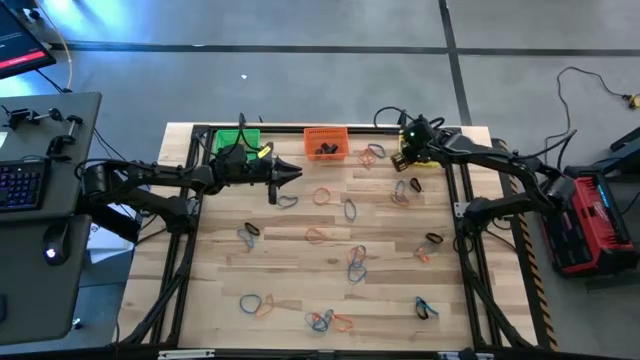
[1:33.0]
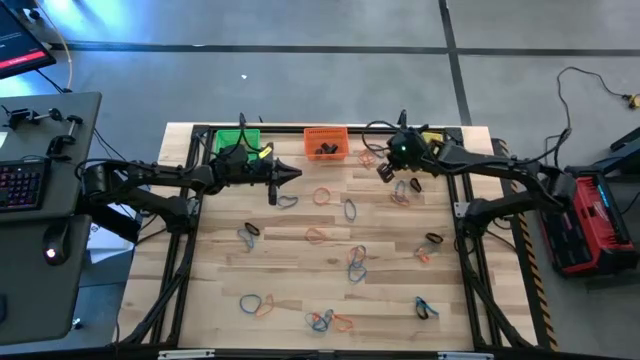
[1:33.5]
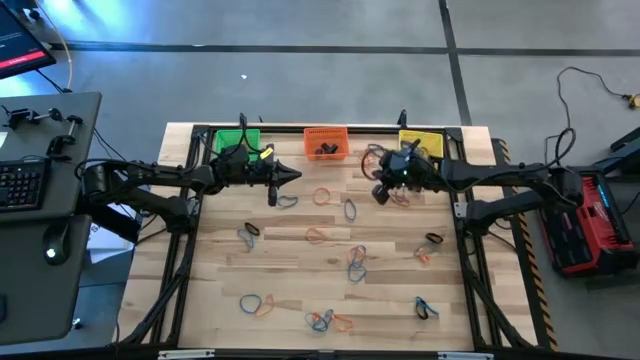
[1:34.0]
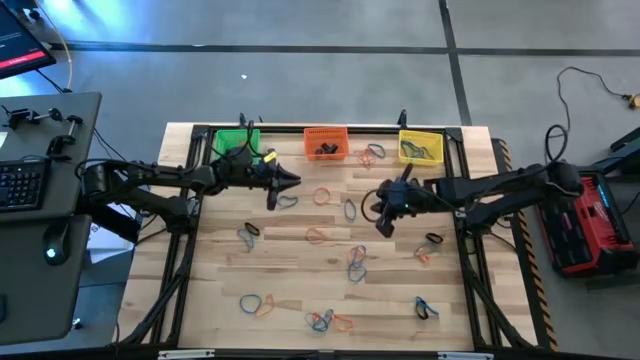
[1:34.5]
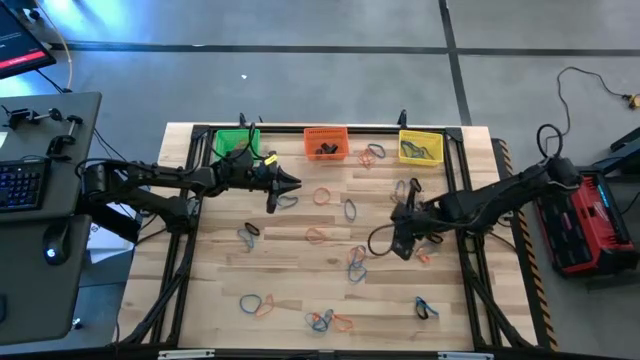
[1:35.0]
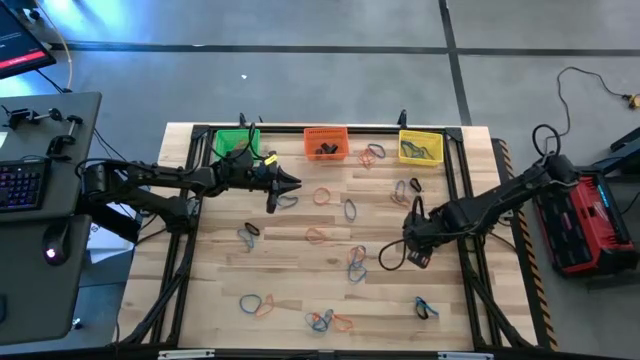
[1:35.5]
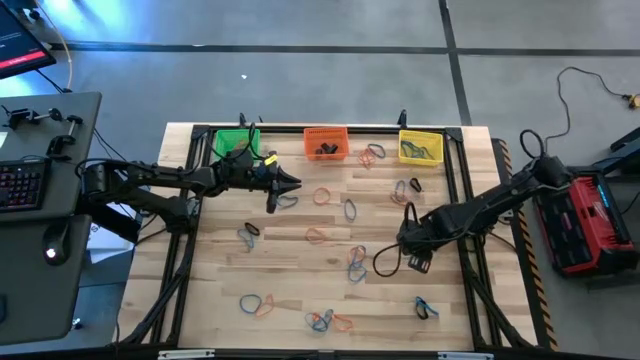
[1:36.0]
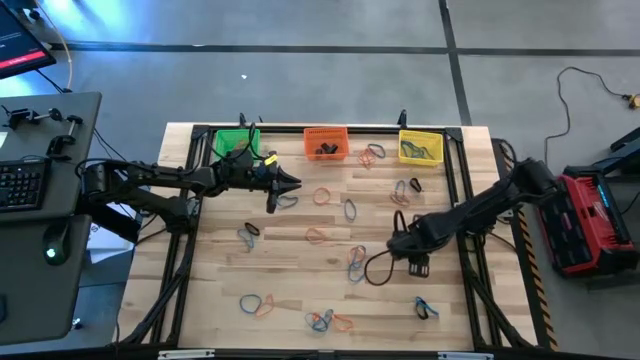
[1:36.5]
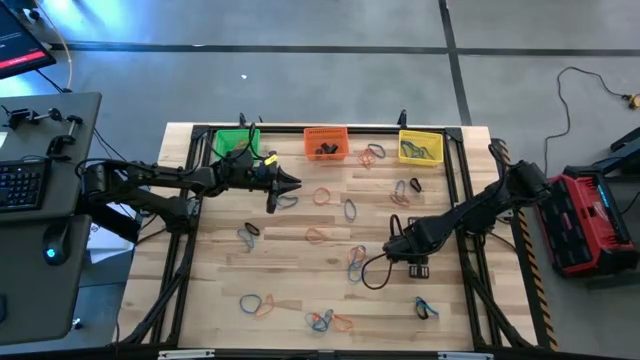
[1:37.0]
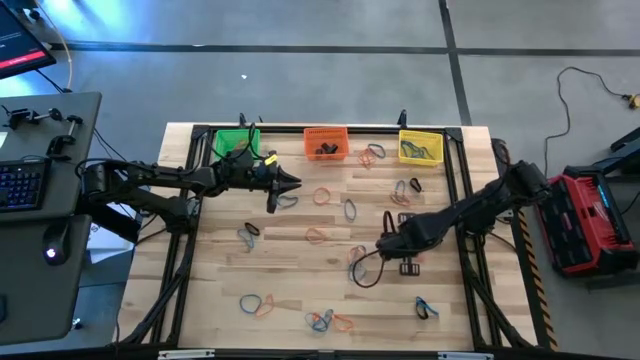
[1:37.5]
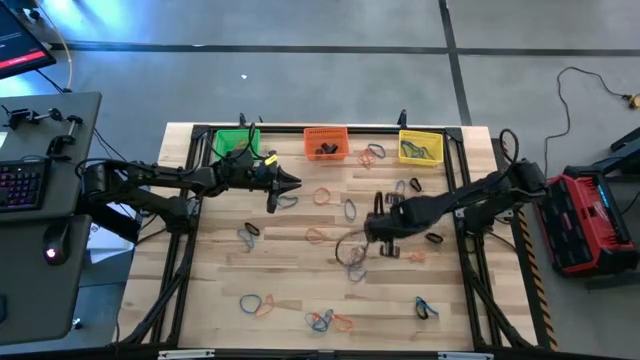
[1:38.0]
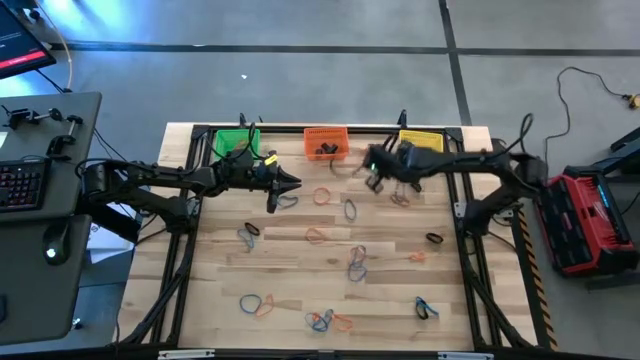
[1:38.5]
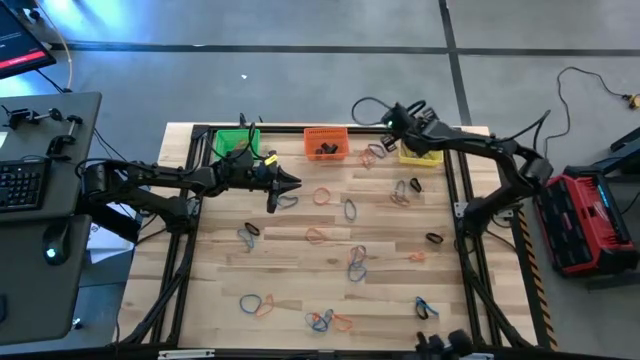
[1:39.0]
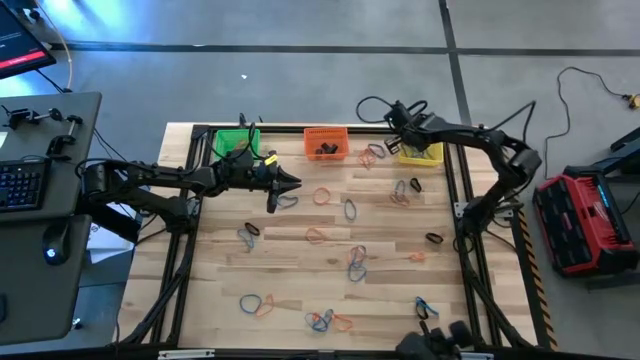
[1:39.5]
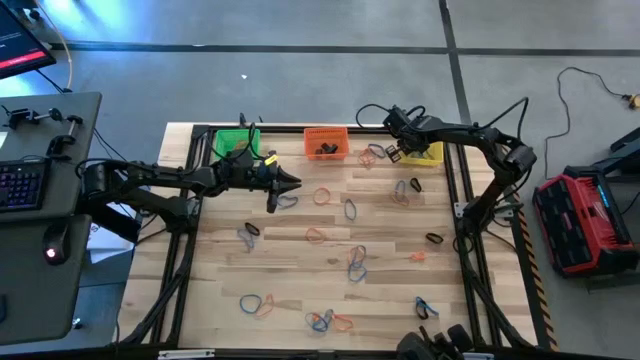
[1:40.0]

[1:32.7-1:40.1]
Task: Sort rubber bands into baskets
Put the blue rubber band into the yellow bin

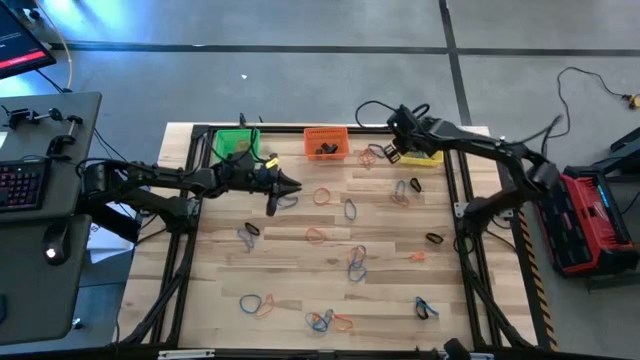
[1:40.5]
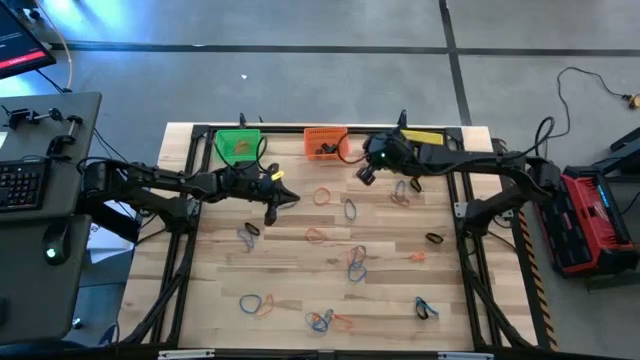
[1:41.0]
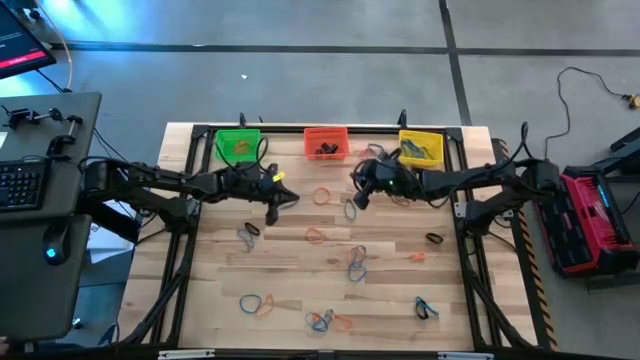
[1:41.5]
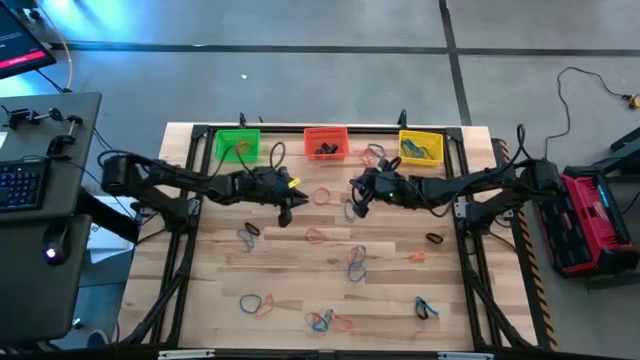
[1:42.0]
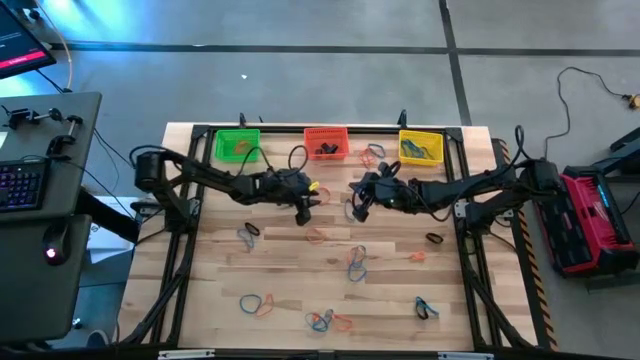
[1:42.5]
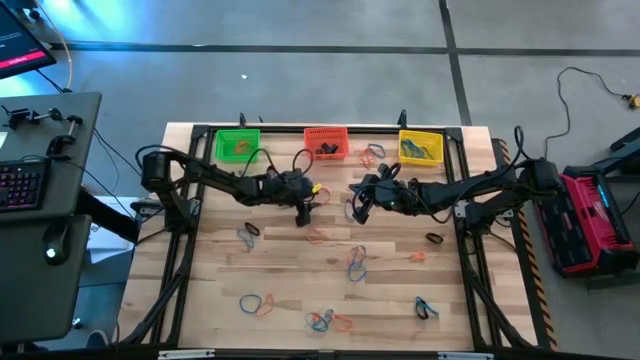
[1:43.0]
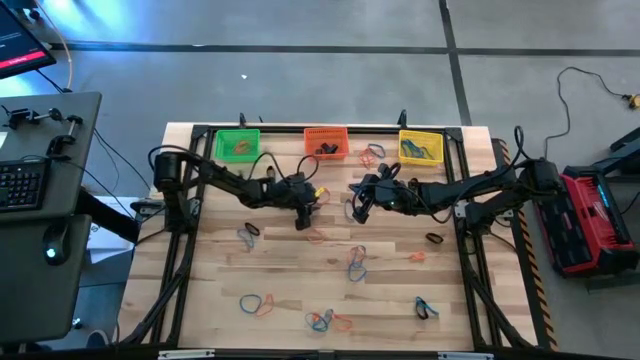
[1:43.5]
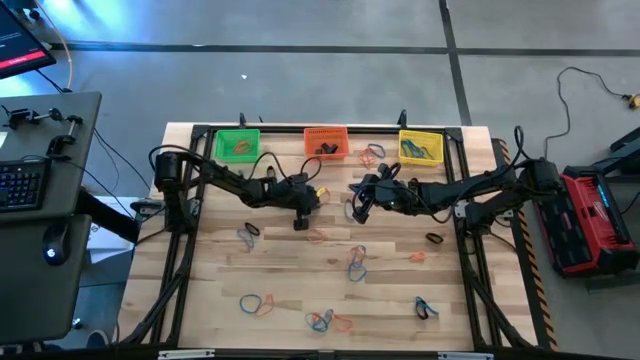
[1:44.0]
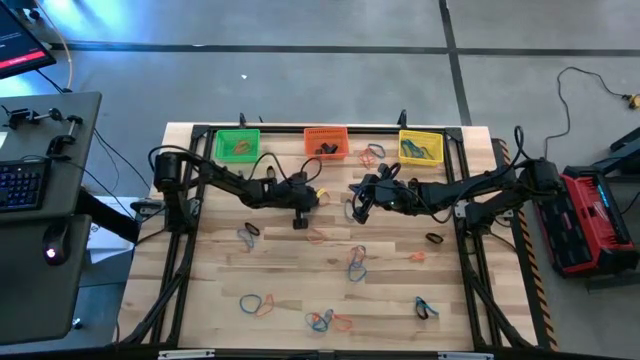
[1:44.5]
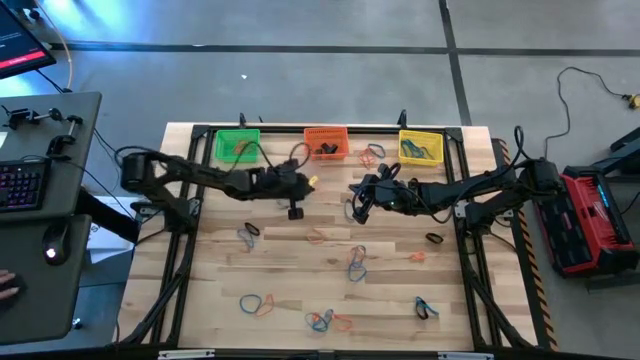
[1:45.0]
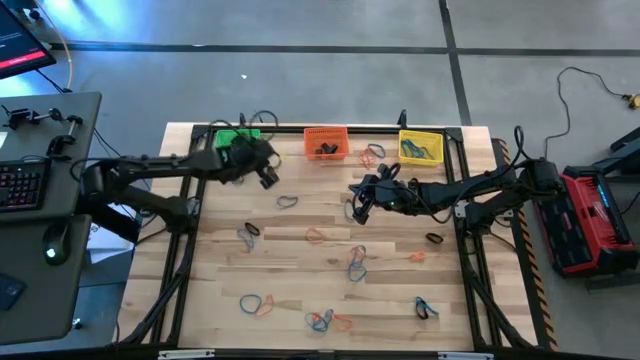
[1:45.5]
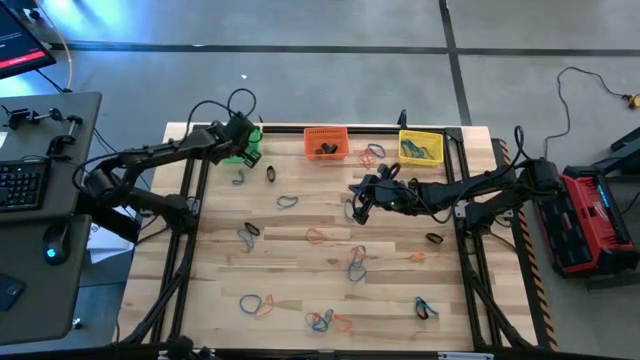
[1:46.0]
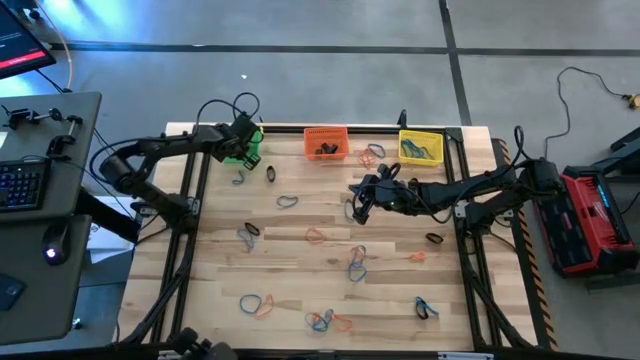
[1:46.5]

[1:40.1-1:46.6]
Put the orange rubber band into the green bin

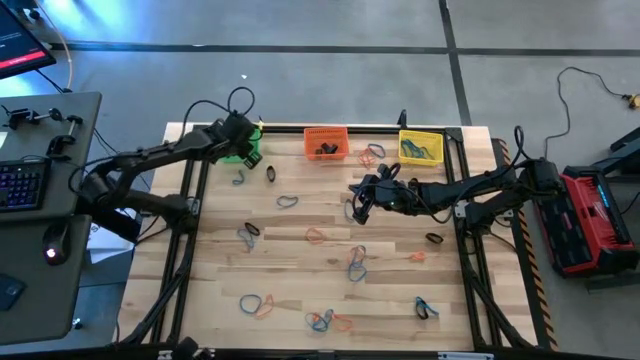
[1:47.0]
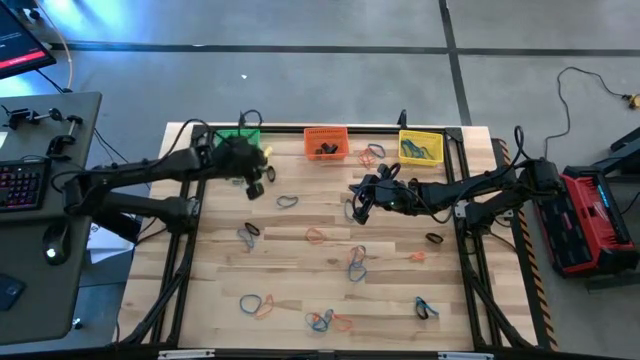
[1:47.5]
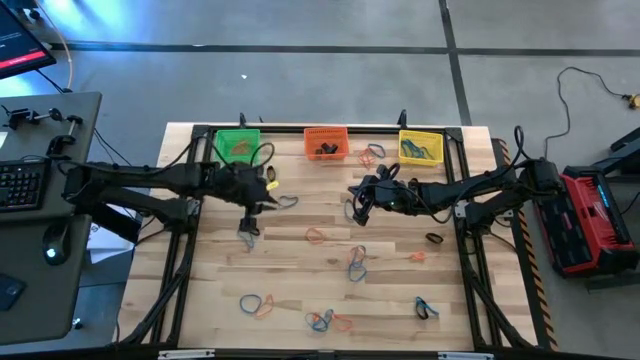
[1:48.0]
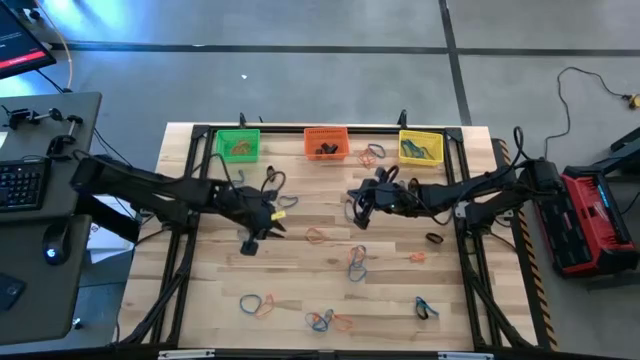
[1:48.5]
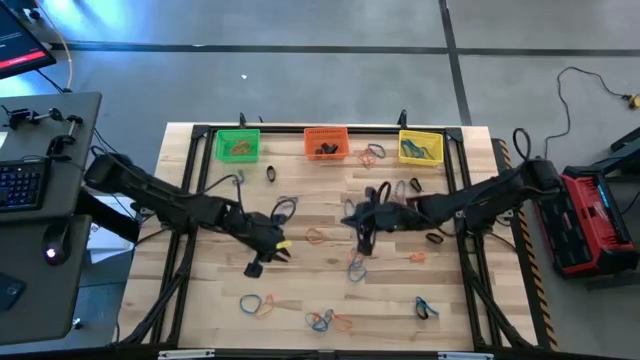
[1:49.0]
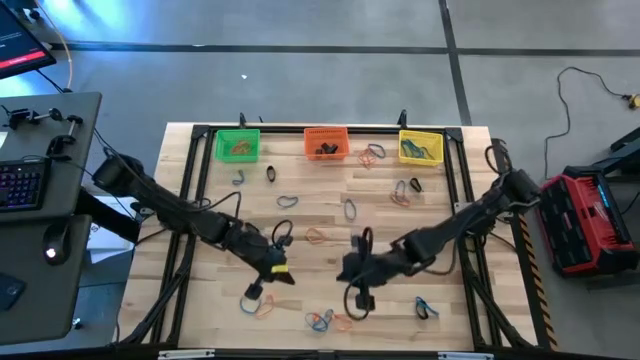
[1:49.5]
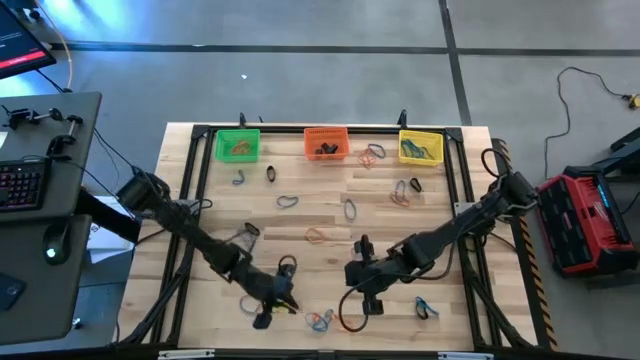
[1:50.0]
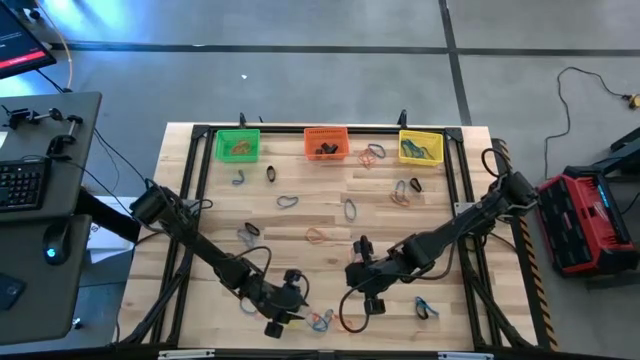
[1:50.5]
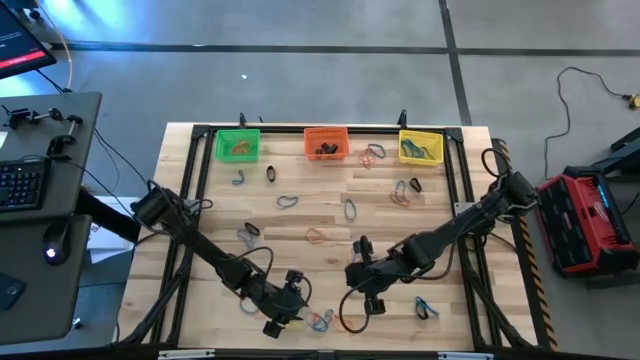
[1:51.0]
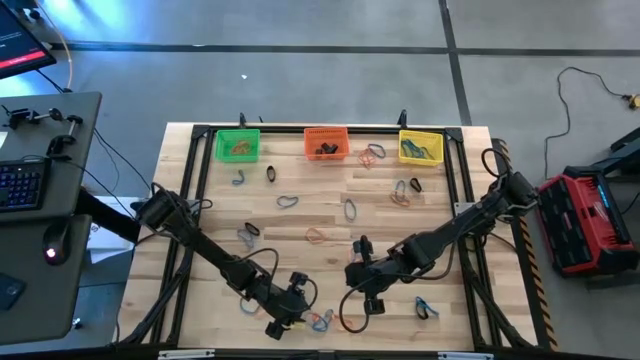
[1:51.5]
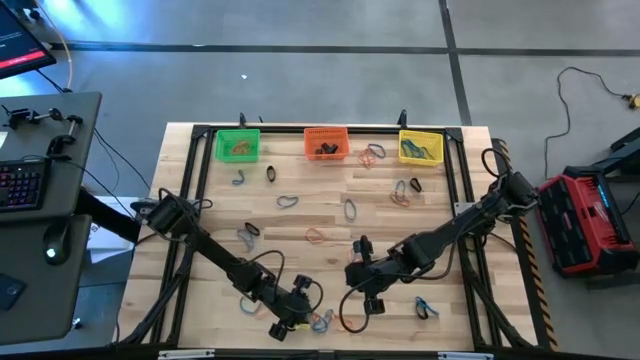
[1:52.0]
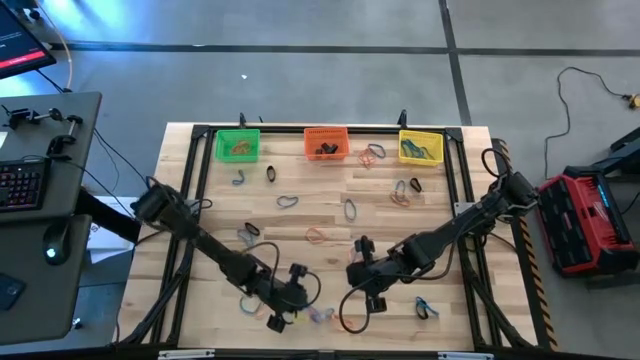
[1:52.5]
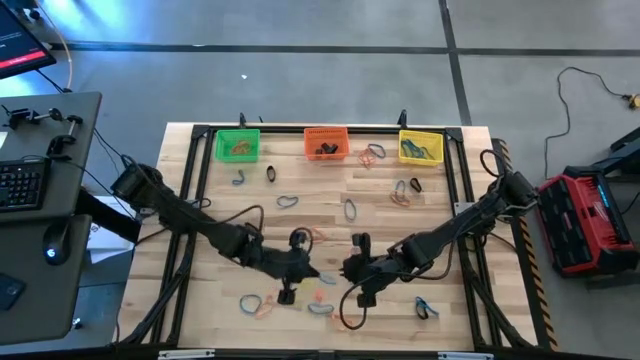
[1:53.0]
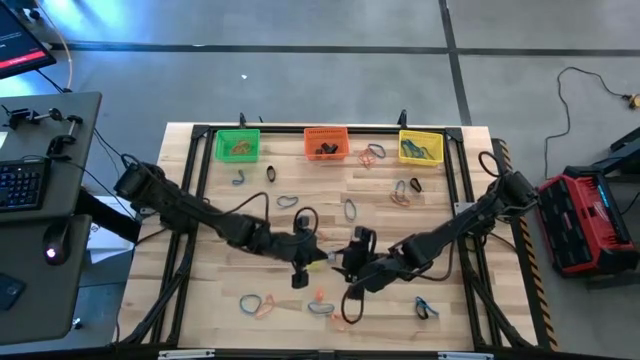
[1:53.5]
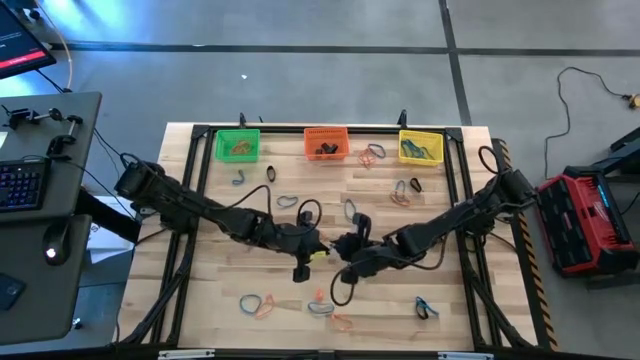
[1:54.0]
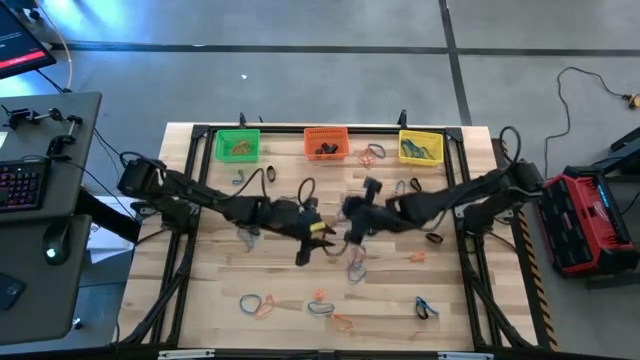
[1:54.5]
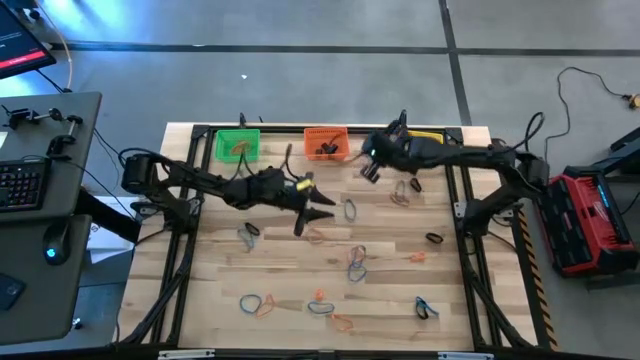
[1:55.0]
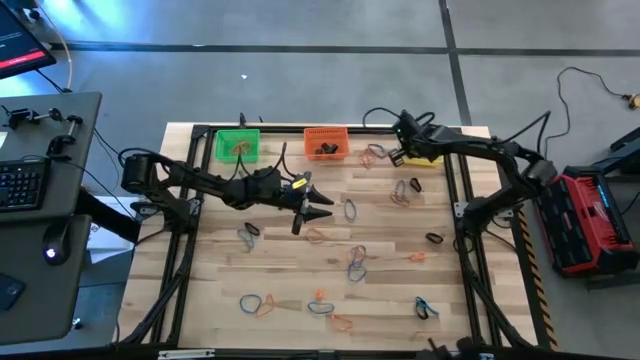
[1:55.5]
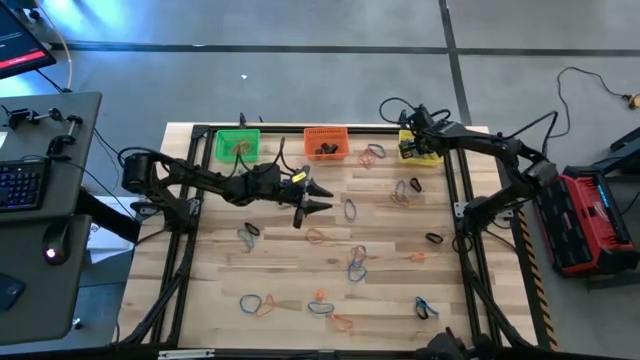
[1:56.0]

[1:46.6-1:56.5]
Put the blue rubber band into the yellow bin
